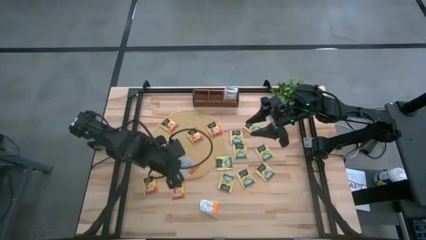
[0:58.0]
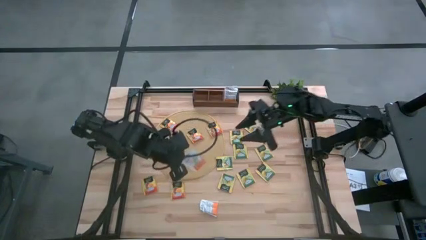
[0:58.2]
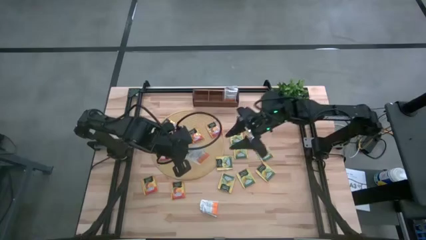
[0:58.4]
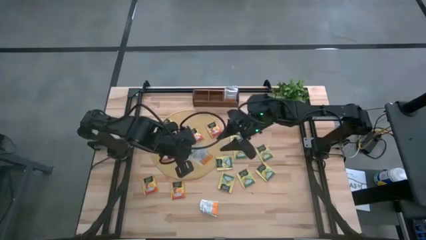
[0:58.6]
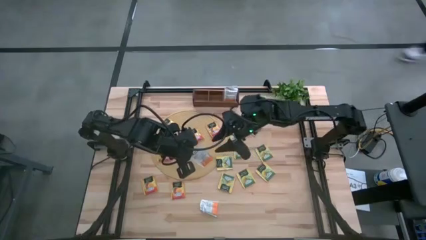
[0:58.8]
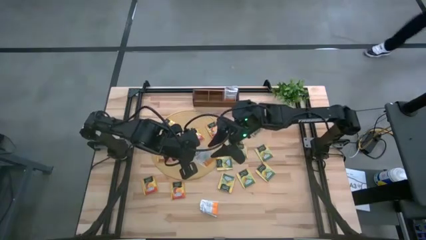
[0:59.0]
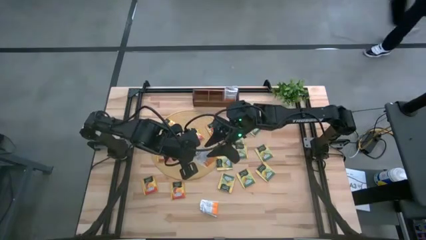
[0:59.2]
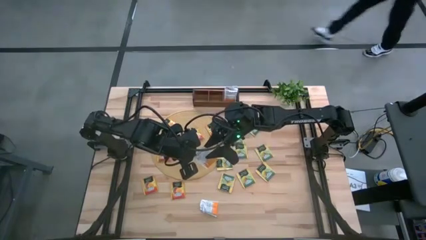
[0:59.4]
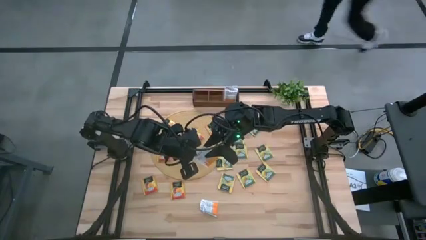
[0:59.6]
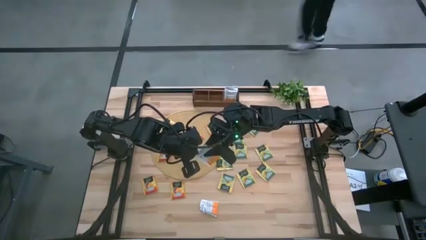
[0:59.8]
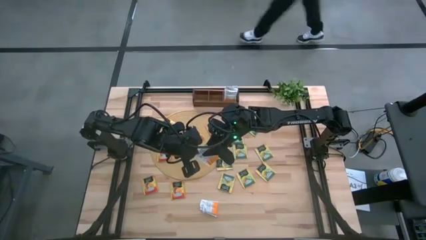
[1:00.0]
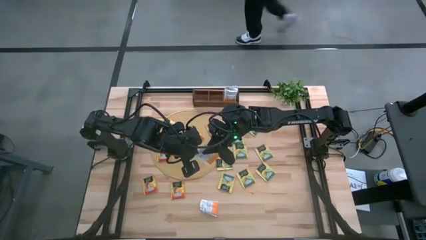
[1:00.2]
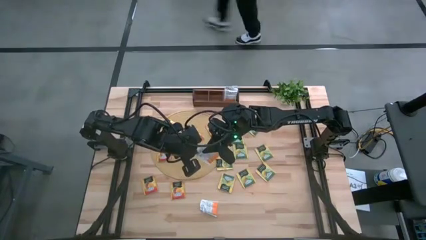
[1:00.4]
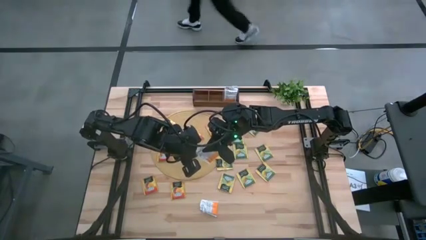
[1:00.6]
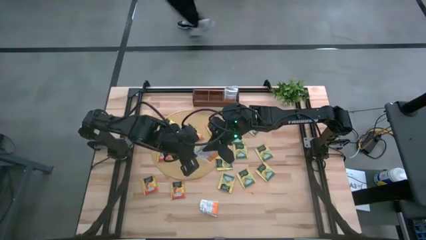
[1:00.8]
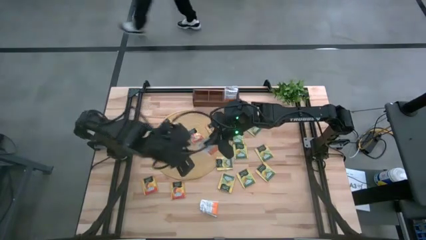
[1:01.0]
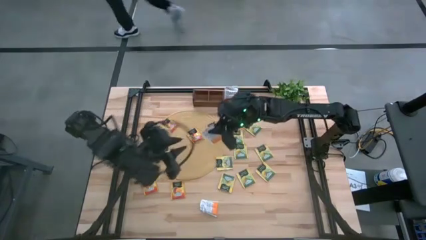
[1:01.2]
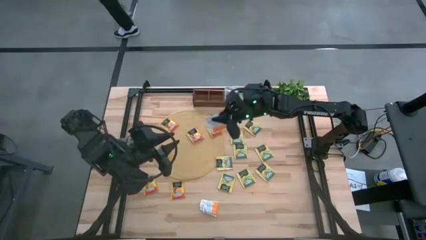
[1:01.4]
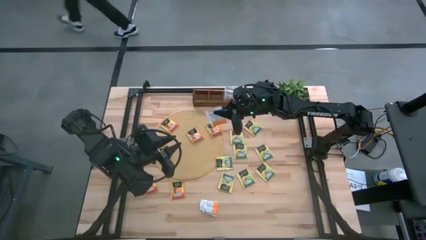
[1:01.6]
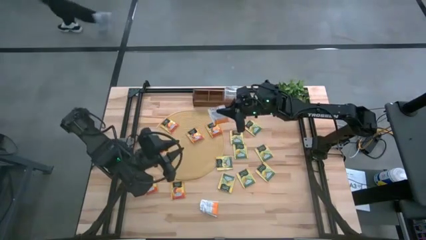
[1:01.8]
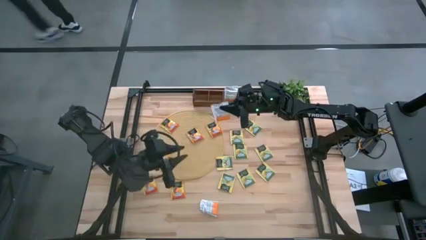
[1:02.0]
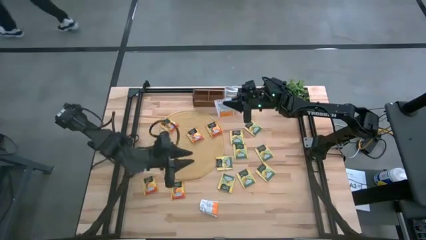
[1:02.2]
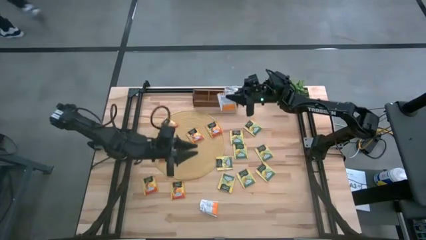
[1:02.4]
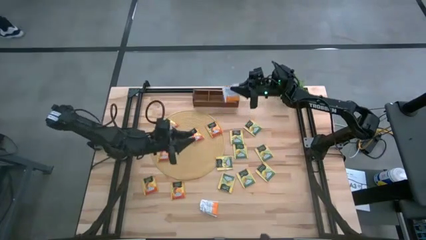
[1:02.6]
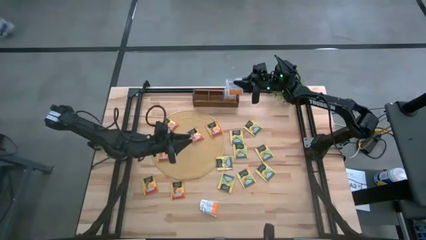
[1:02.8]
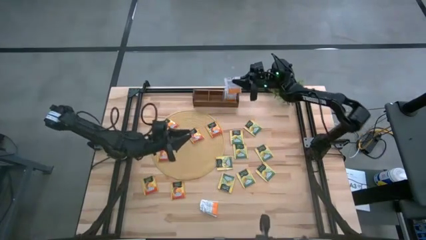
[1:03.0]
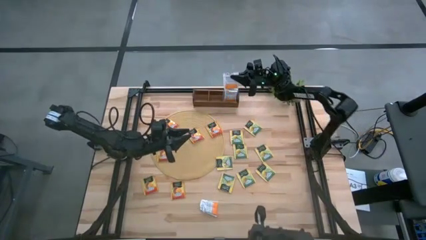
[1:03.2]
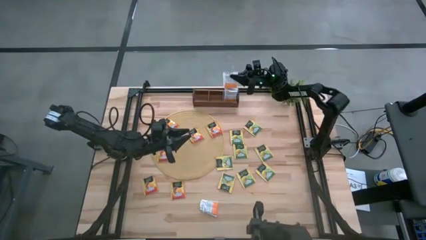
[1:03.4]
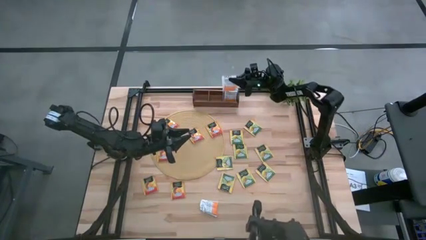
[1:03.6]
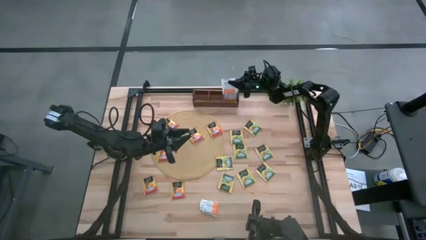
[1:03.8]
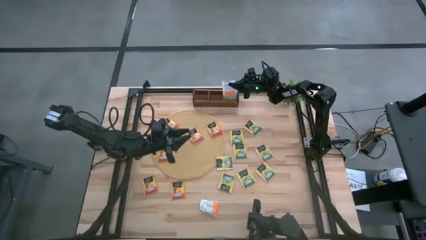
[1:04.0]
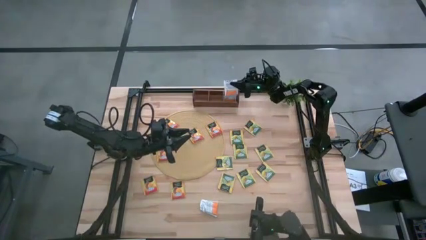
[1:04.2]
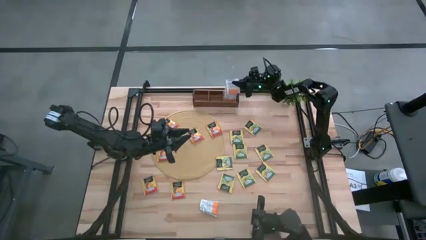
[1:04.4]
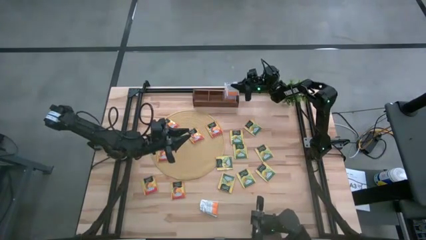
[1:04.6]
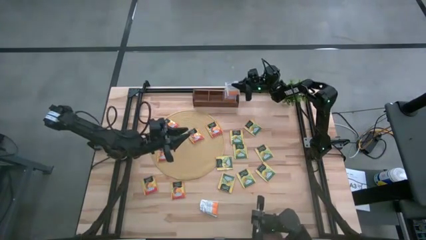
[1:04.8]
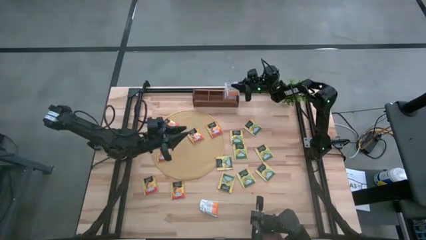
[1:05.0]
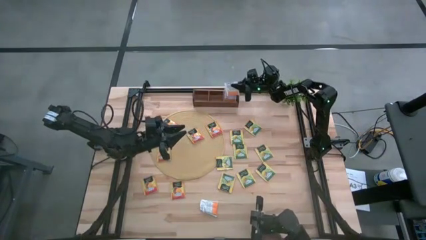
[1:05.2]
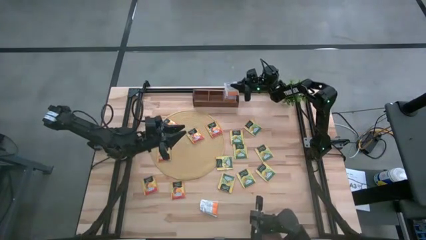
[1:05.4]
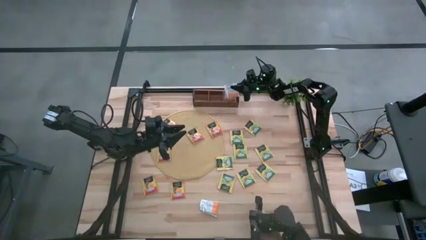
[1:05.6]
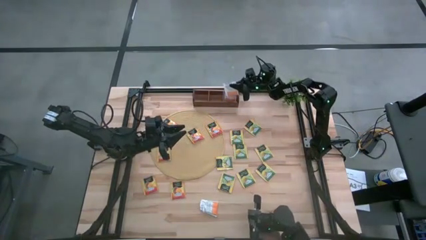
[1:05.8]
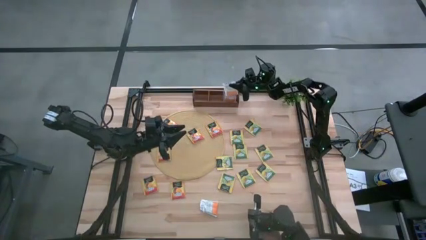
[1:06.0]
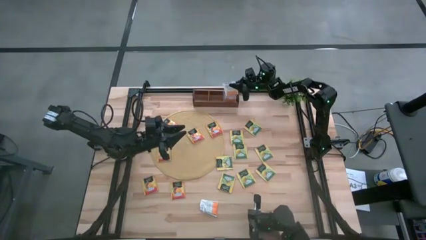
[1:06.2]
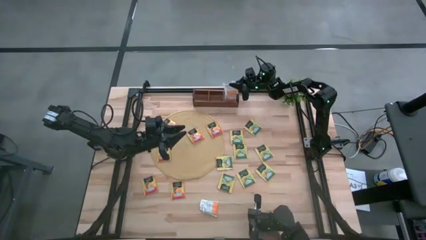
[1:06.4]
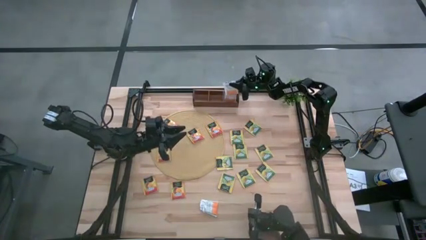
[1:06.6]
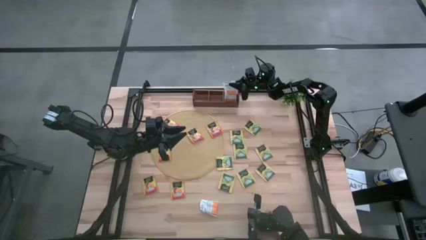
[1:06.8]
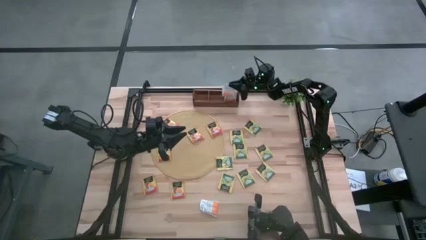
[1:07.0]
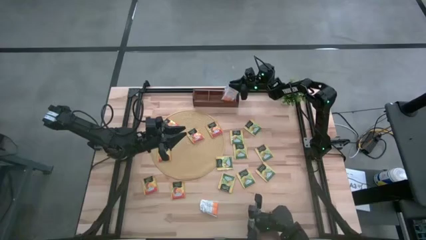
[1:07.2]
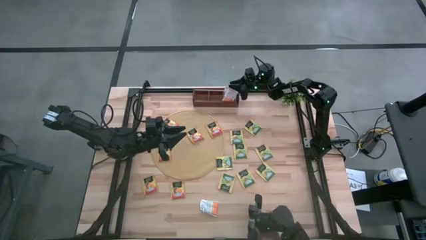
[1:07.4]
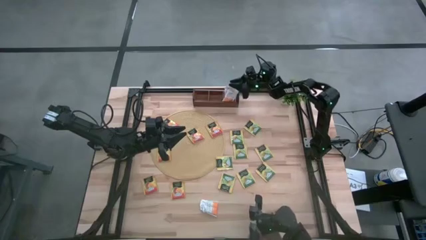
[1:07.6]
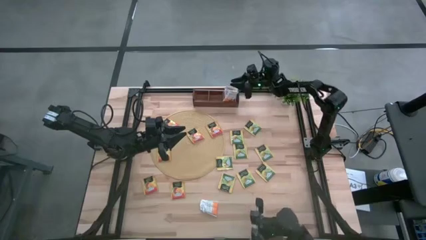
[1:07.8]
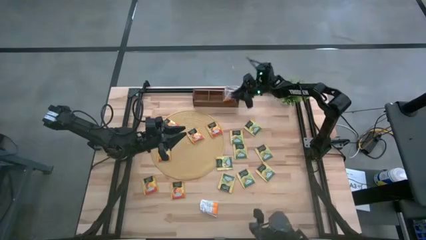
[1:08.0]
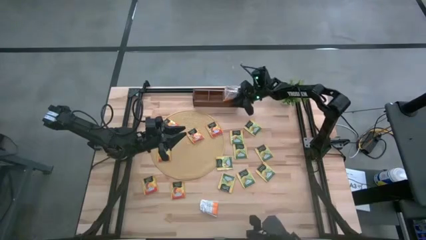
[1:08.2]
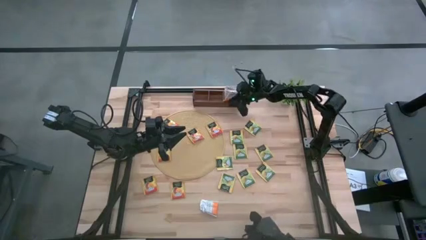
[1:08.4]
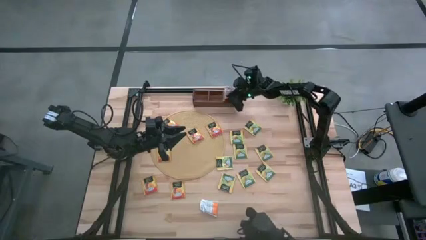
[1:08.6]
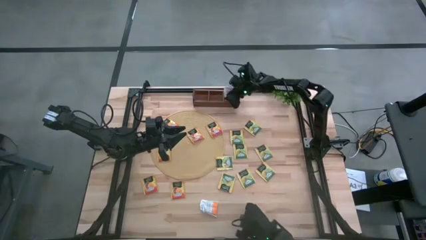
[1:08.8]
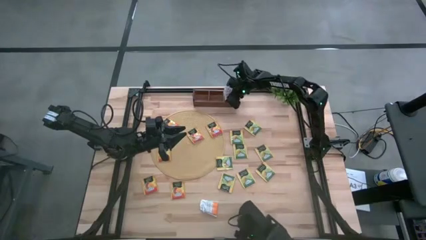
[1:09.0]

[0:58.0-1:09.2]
Task: Pick & Place Tea
Put the left white tea bag into the right section of the wooden organizer

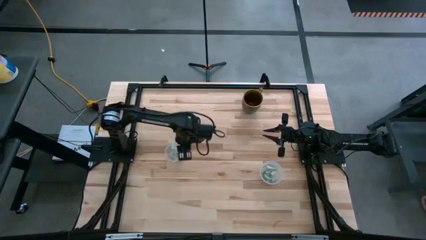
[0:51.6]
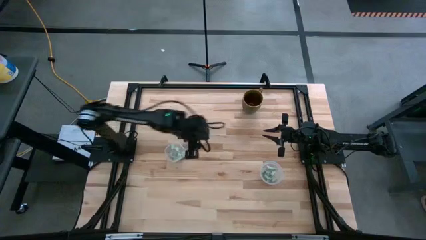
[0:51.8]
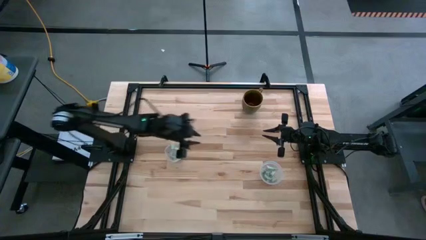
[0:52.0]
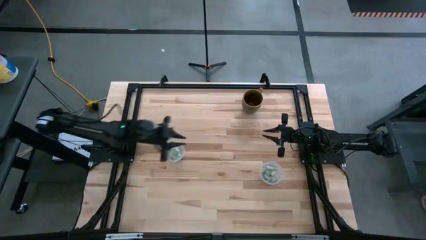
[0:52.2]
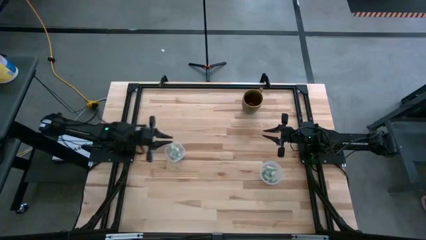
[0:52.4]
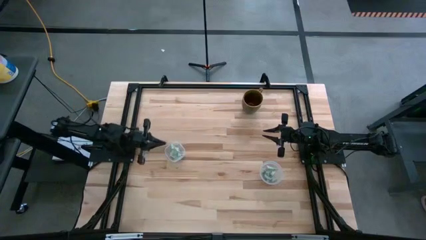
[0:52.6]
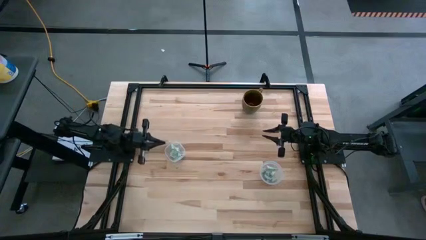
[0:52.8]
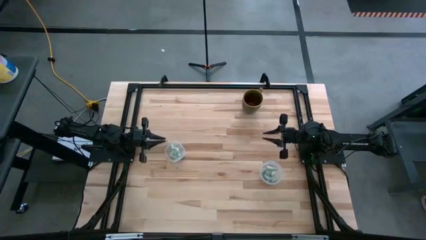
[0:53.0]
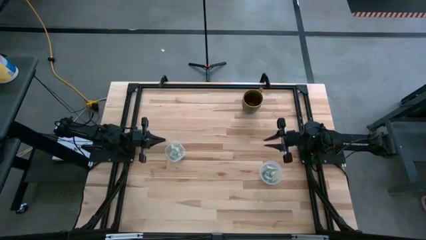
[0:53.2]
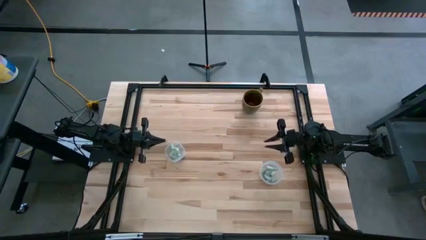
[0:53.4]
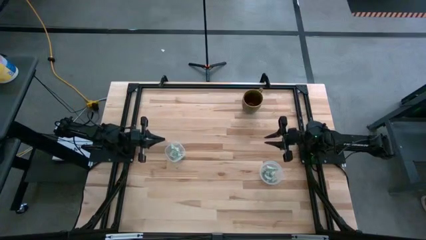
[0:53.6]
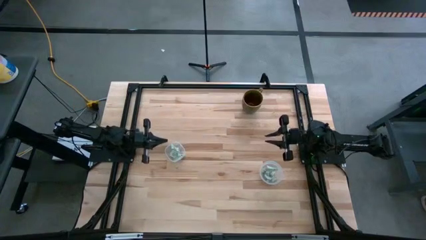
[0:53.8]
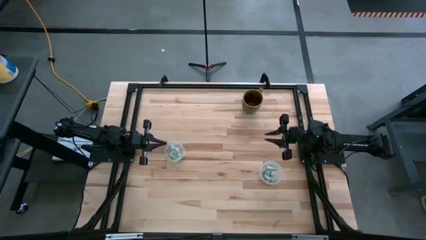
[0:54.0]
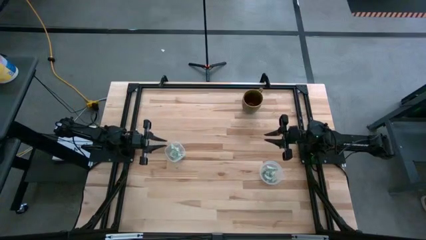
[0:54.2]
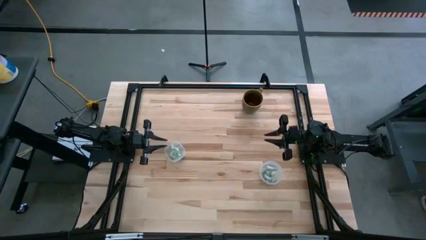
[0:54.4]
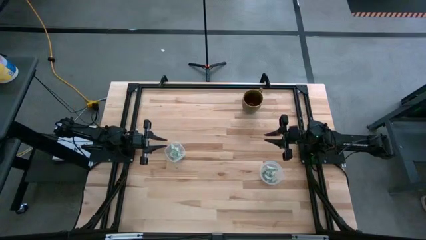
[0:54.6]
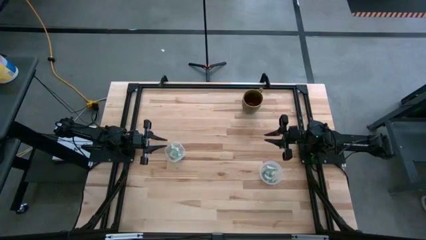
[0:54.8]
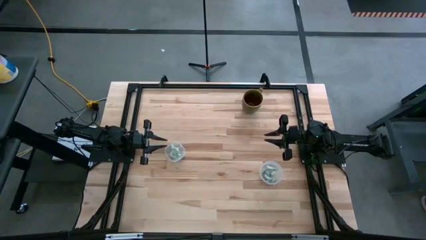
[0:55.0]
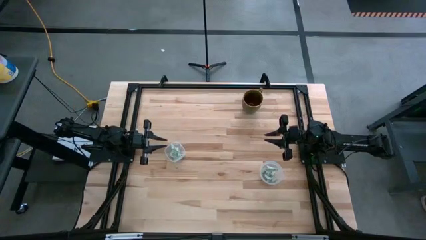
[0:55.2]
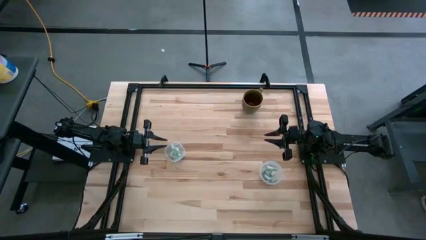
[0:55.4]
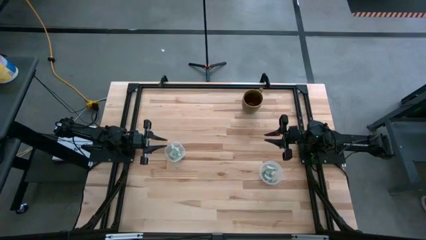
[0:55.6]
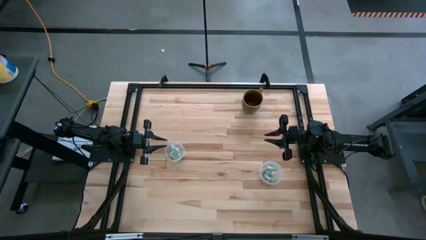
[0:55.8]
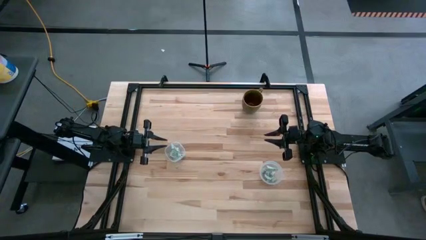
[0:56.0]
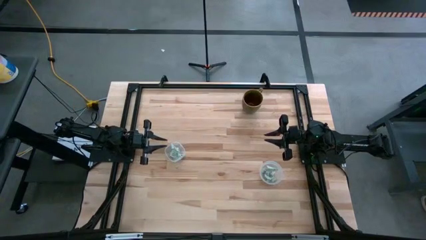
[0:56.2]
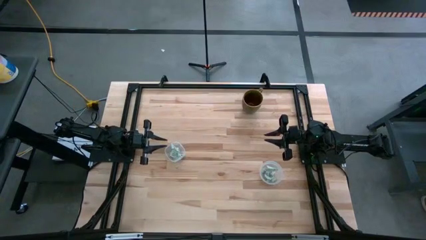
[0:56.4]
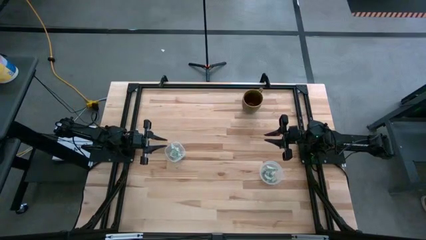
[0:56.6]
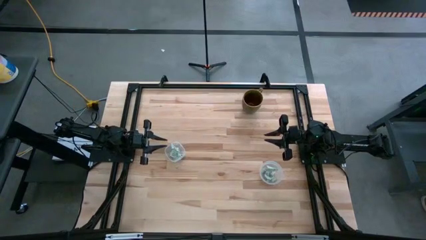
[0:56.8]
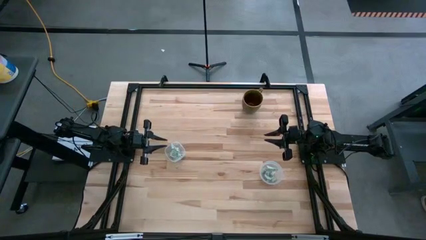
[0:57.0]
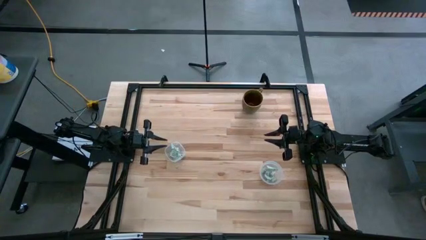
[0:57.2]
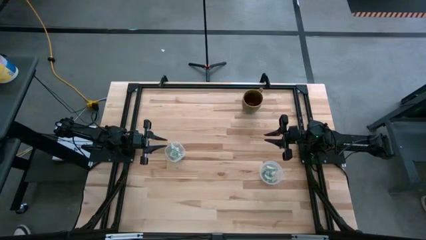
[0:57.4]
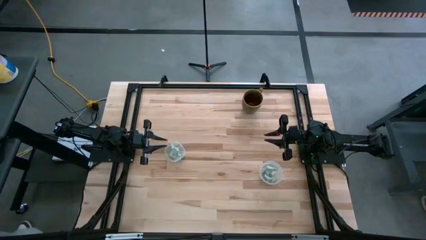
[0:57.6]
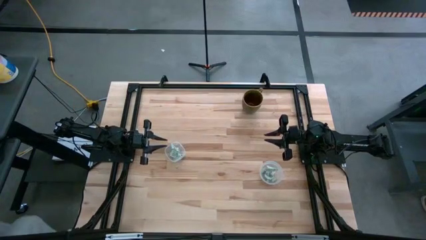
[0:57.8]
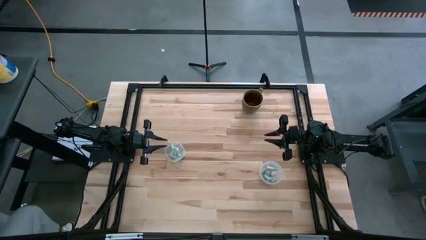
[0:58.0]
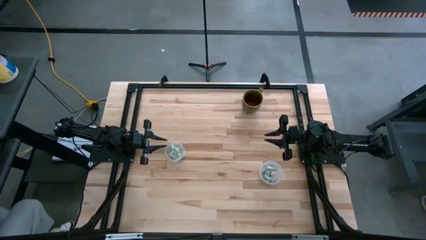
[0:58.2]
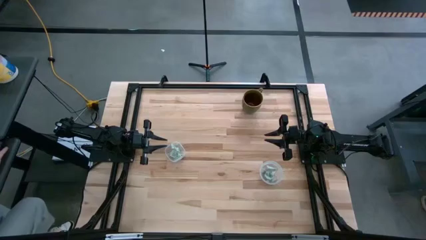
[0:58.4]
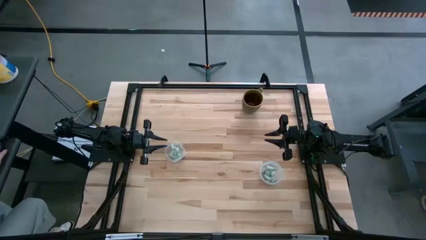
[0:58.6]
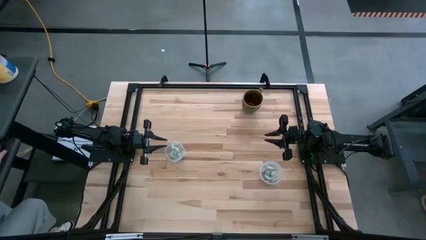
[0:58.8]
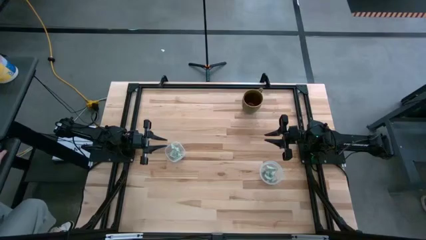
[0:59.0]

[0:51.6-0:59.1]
Task: Pick and place Stevia / Truvia into bins
Return to Home Position
